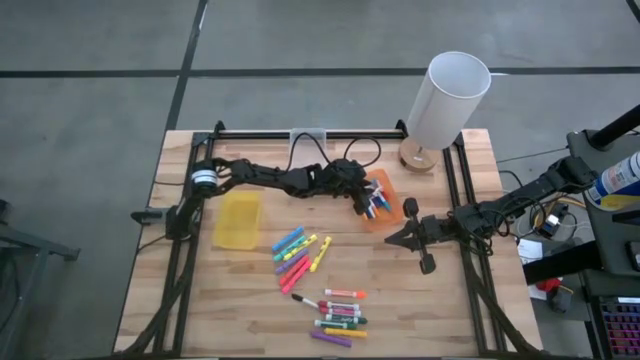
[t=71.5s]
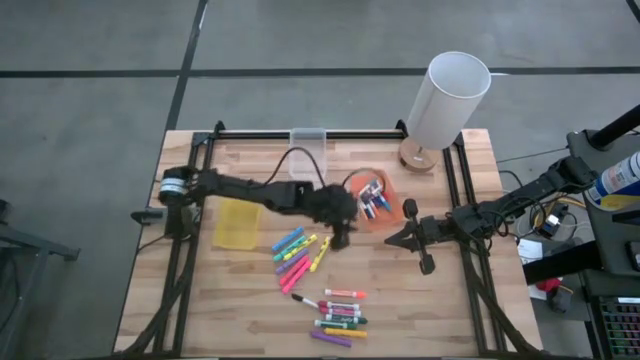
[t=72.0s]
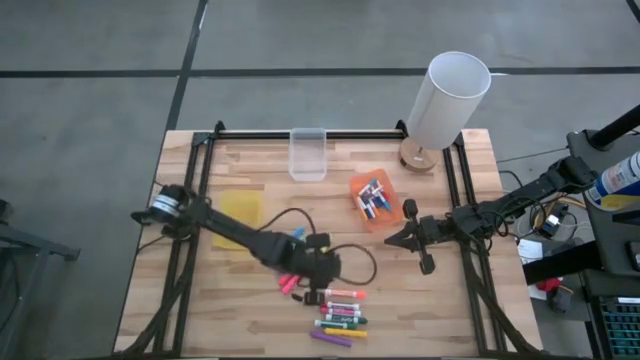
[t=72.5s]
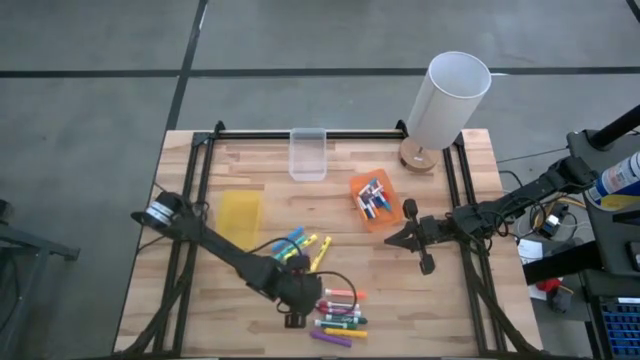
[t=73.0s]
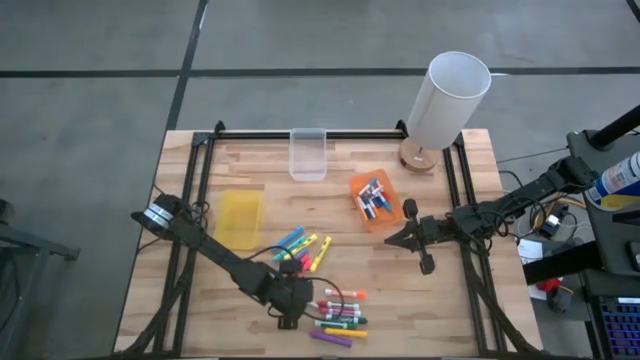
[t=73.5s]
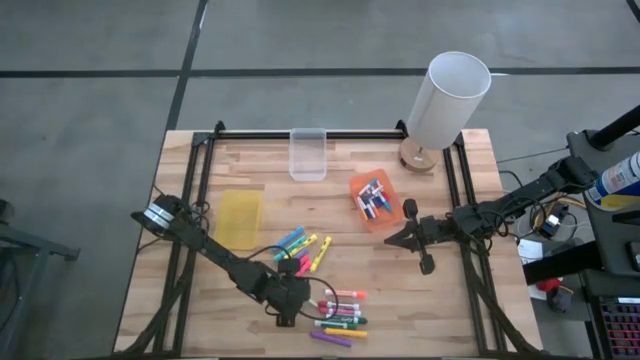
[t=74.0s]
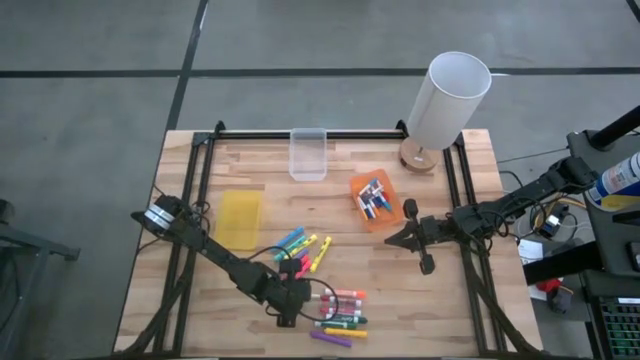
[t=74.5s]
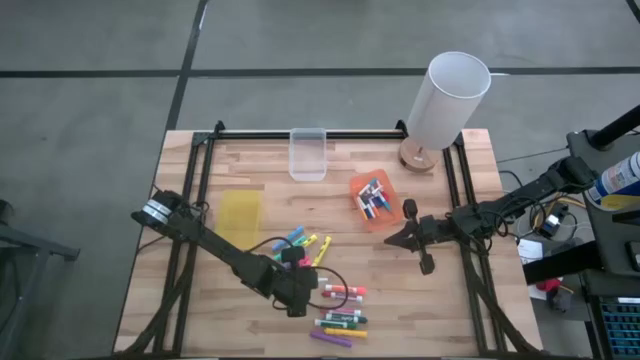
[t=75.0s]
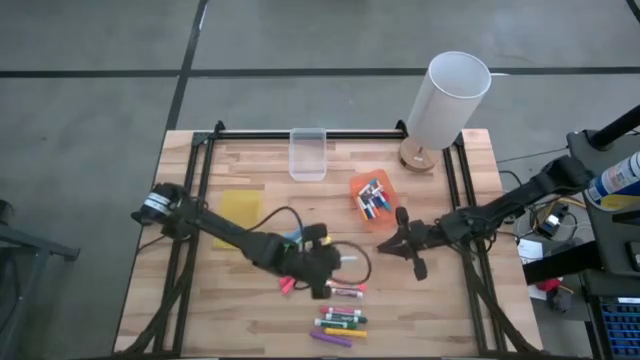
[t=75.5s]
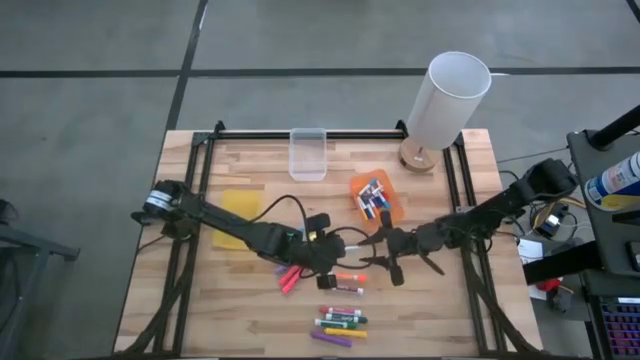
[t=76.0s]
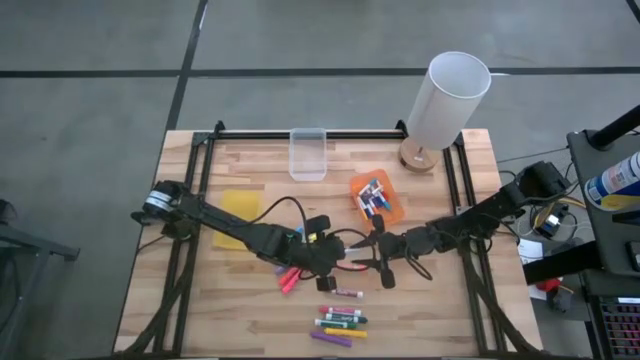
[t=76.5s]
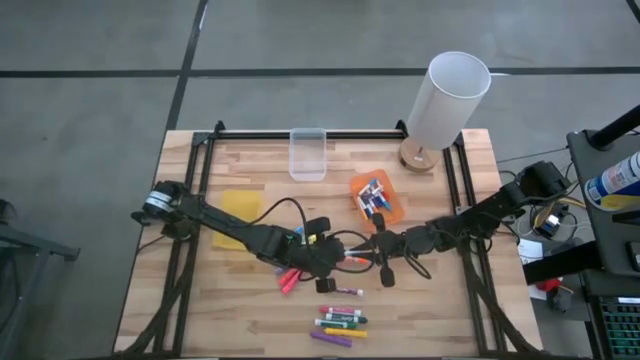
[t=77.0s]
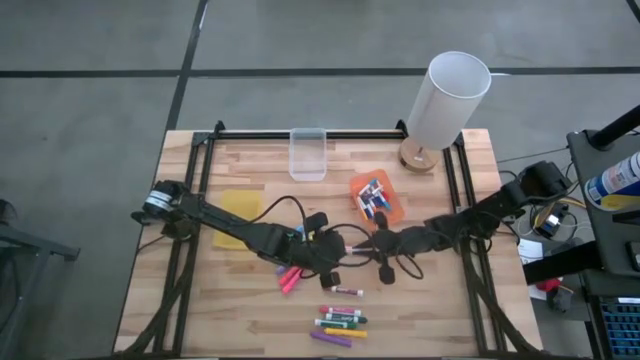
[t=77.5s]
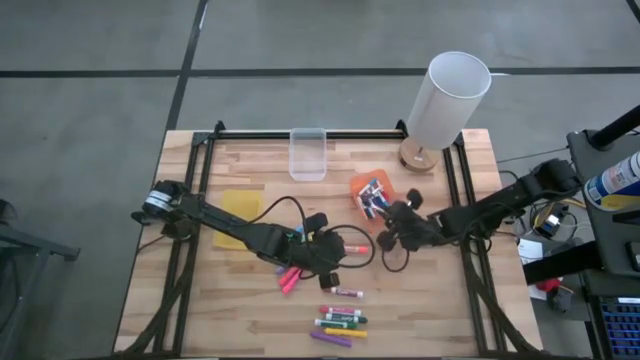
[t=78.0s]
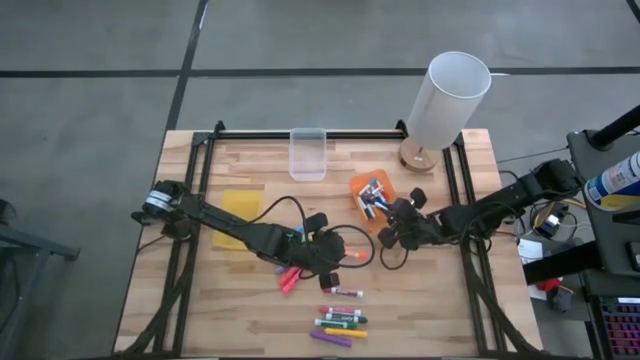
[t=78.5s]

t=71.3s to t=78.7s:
Task: Pick & Place Markers
Put the small black marker into the orange bin

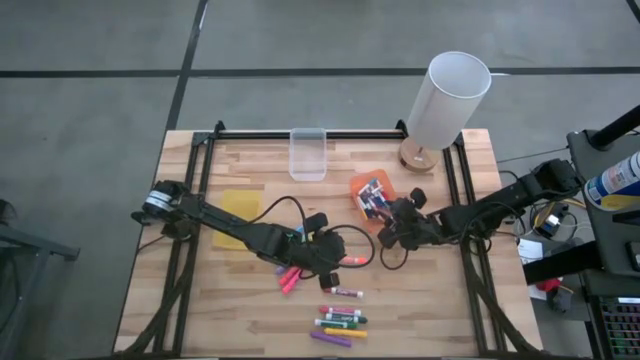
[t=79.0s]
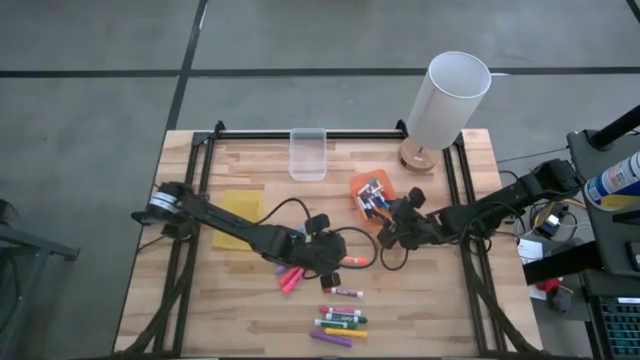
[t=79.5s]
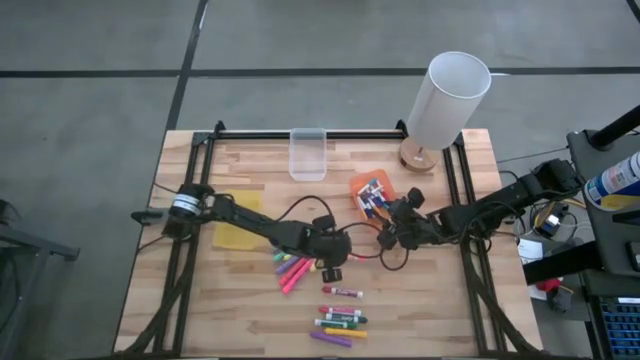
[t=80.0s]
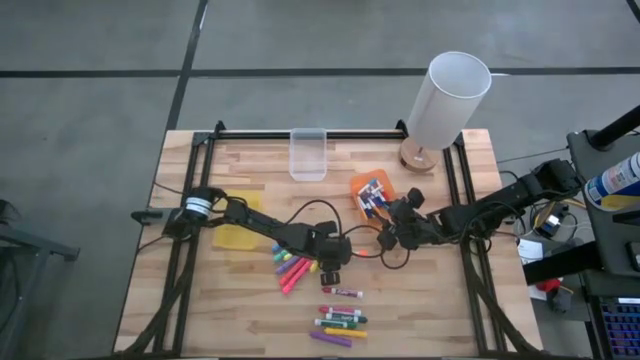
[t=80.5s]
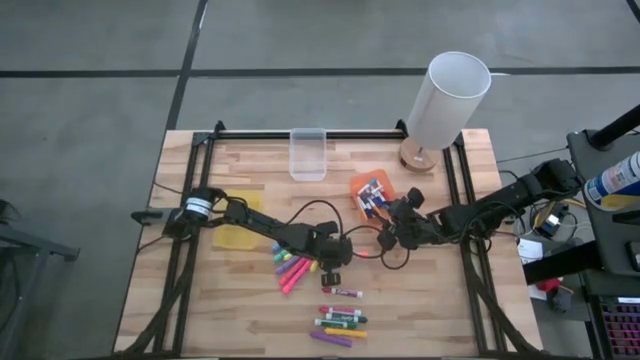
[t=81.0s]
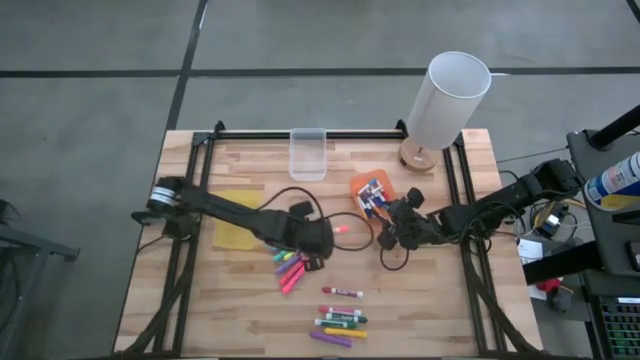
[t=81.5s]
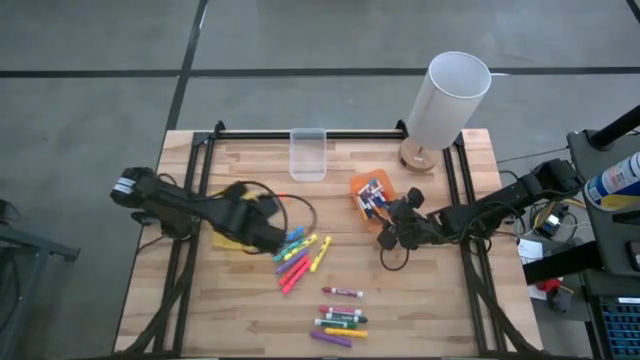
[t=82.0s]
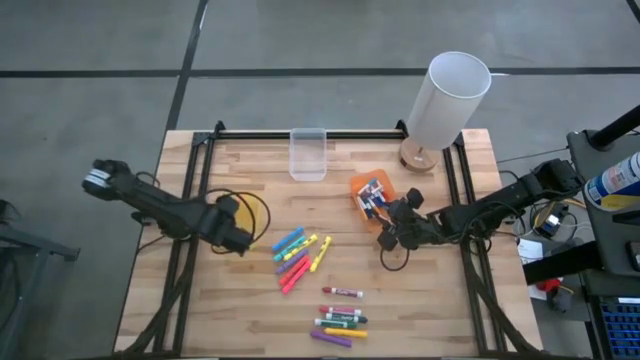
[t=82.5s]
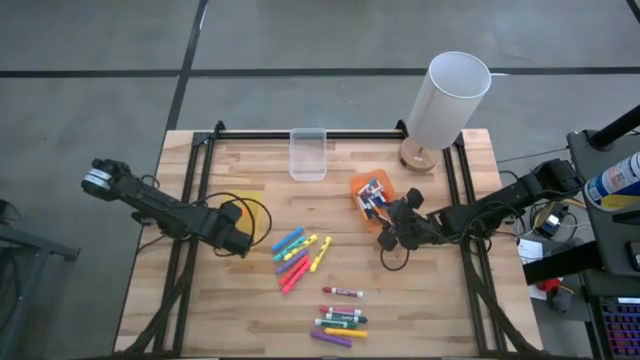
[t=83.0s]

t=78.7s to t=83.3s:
Put the big orange marker into the yellow bin

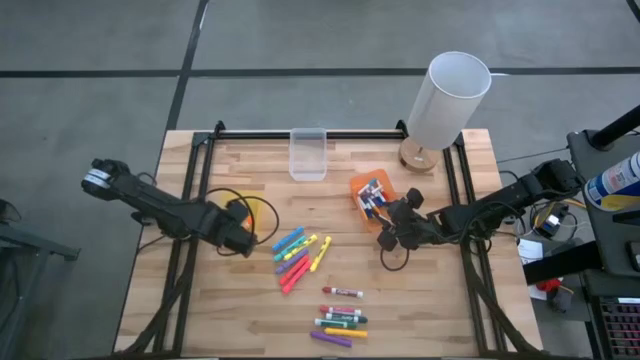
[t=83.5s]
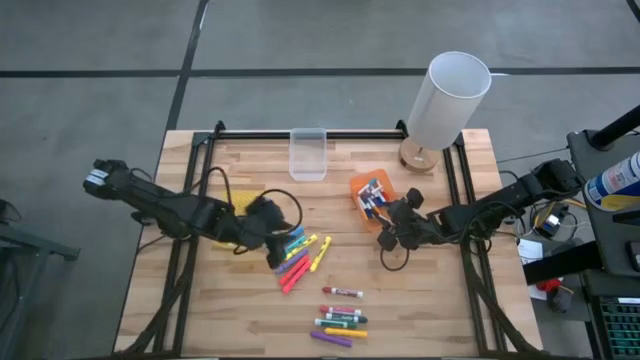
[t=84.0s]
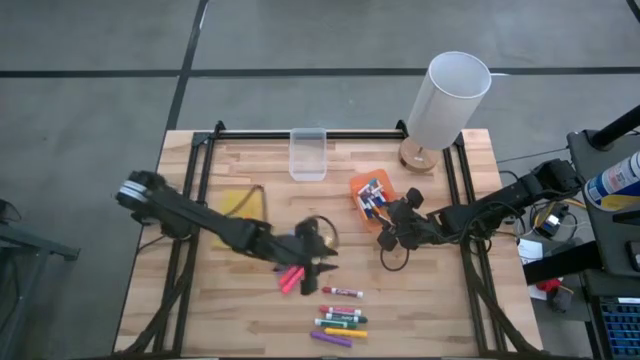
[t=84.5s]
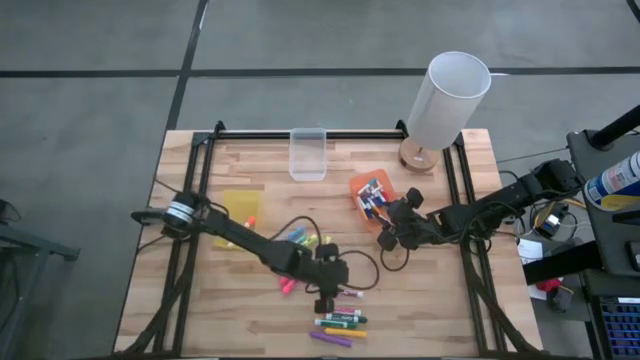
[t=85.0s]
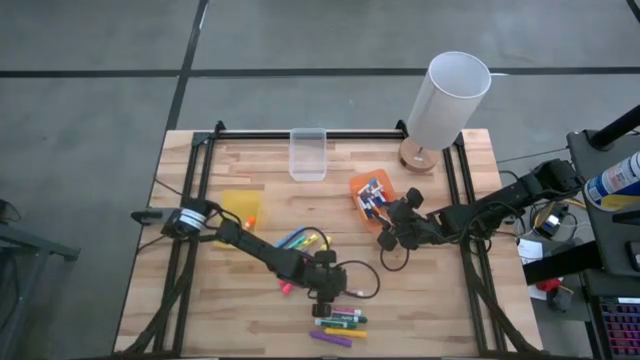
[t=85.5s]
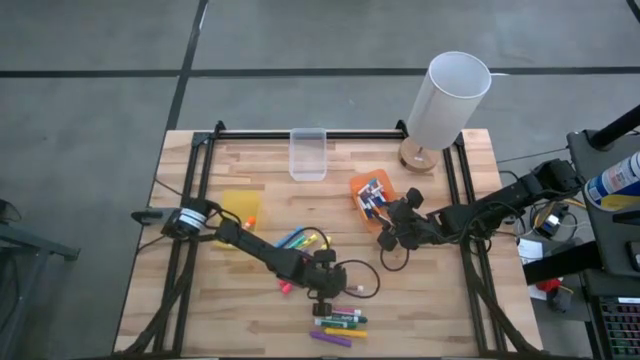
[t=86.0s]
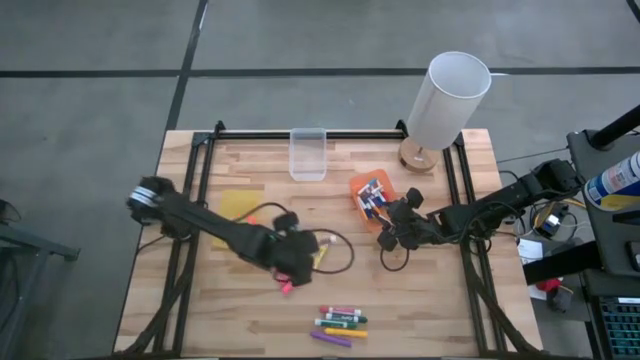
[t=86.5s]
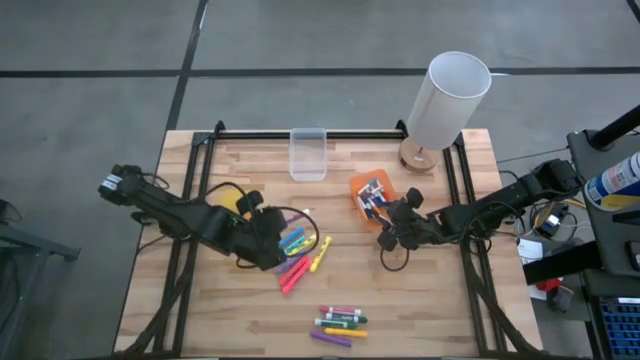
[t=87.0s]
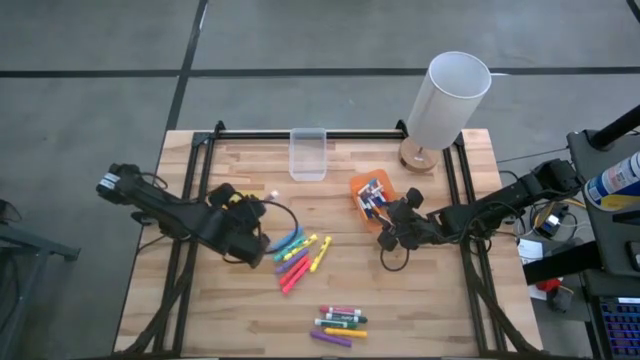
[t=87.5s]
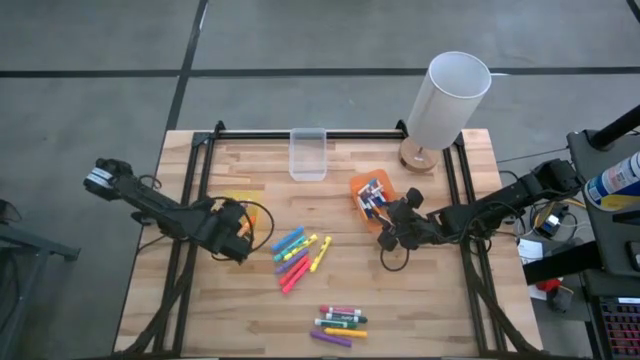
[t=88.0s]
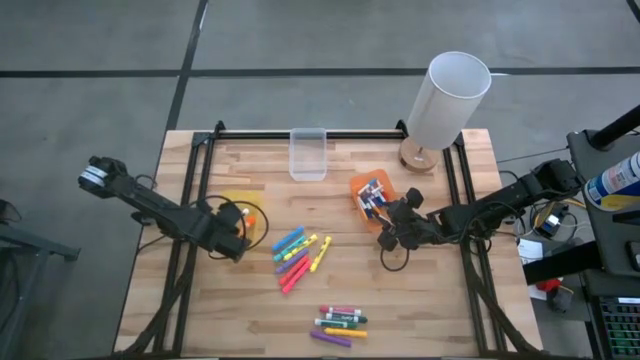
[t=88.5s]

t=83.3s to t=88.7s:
Put the big red marker into the yellow bin

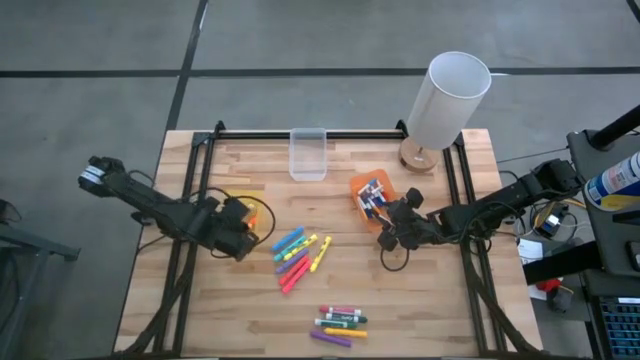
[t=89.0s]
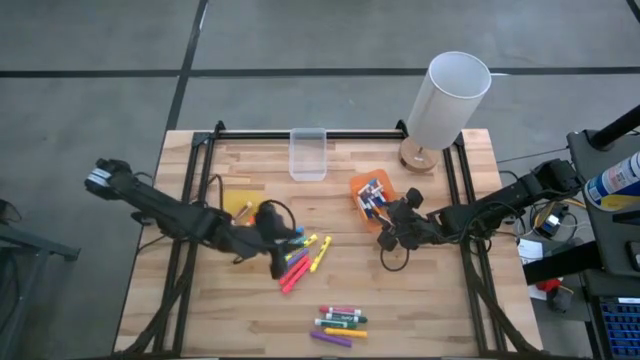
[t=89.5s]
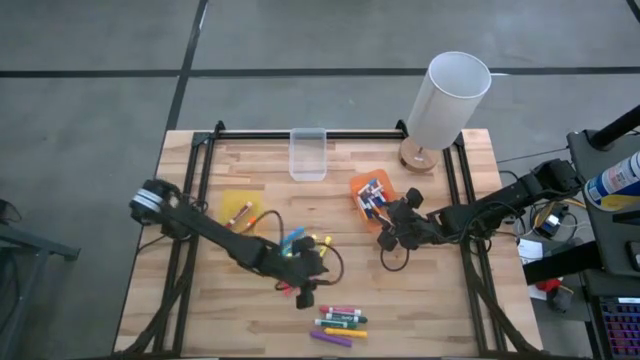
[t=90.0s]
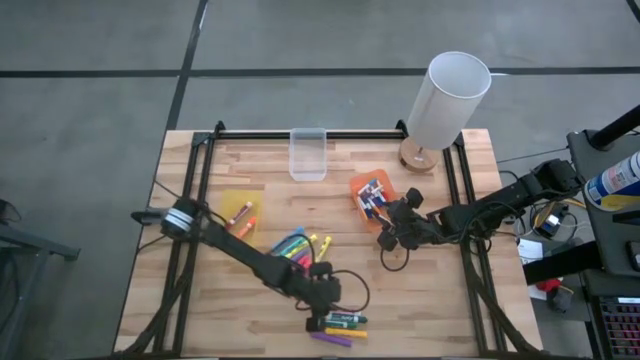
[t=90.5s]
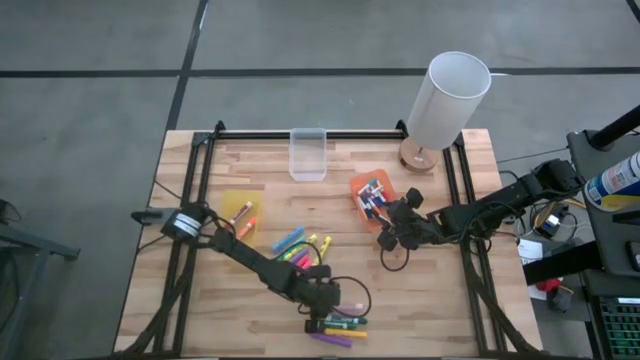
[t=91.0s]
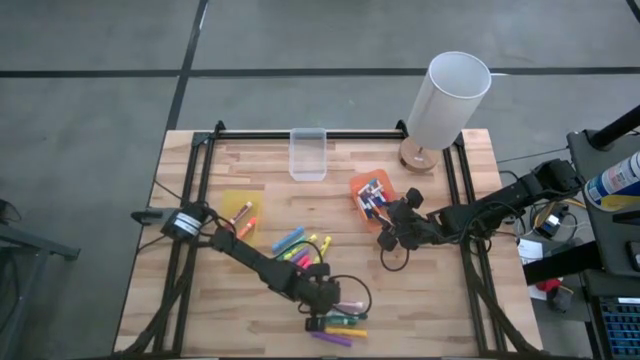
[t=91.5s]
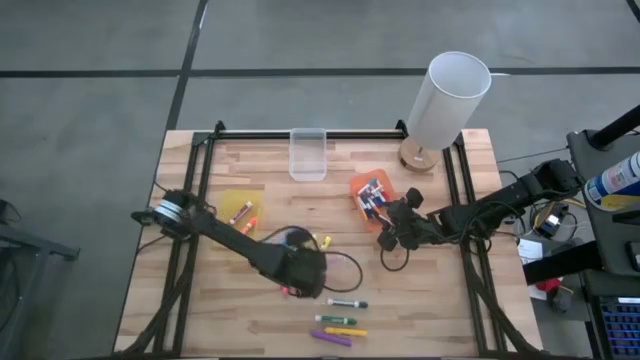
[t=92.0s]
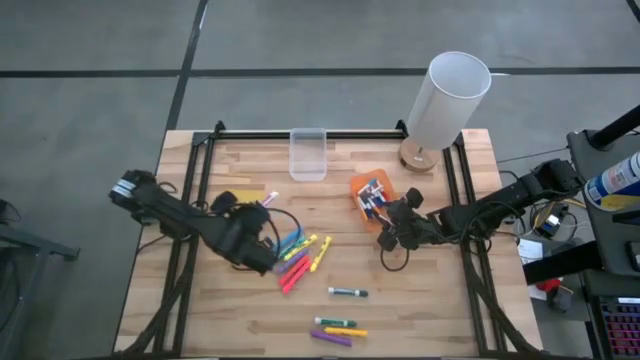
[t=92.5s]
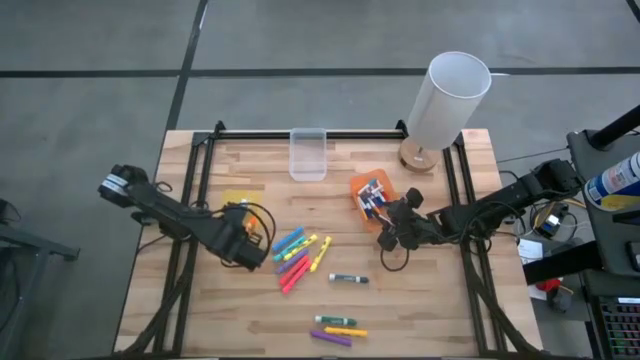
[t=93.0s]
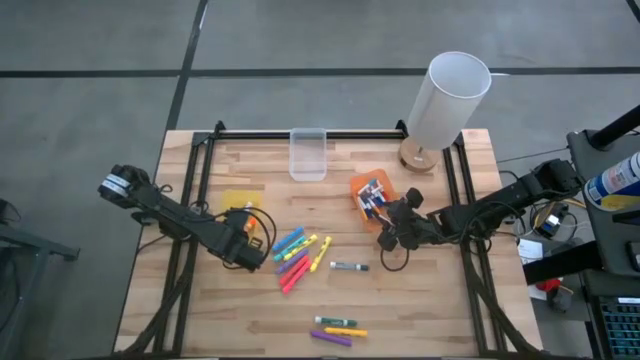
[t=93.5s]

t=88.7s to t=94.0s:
Put the big pink marker into the yellow bin
